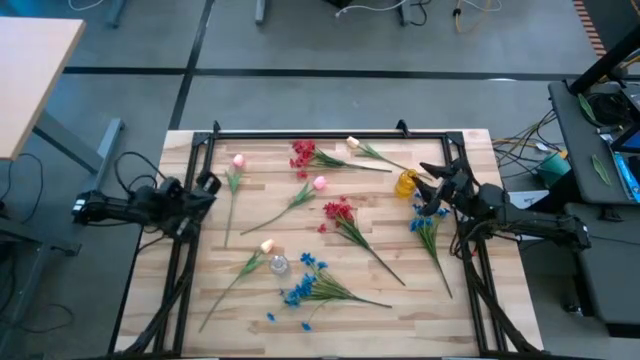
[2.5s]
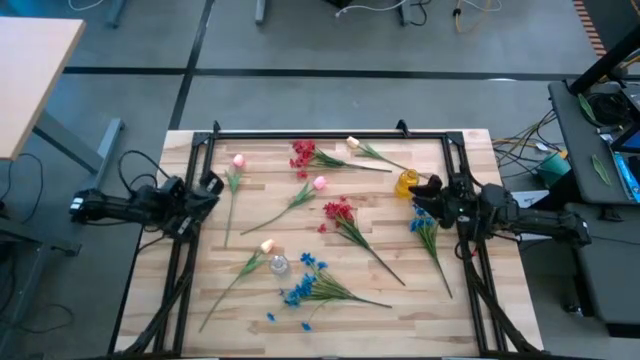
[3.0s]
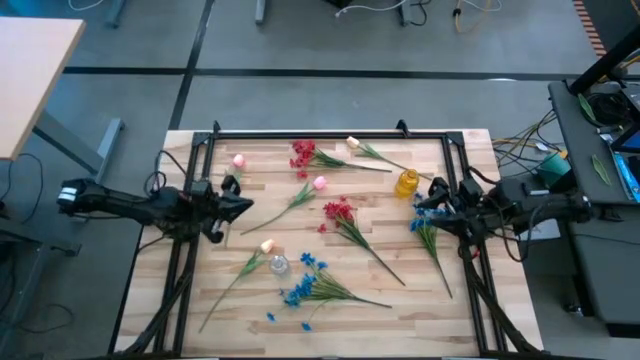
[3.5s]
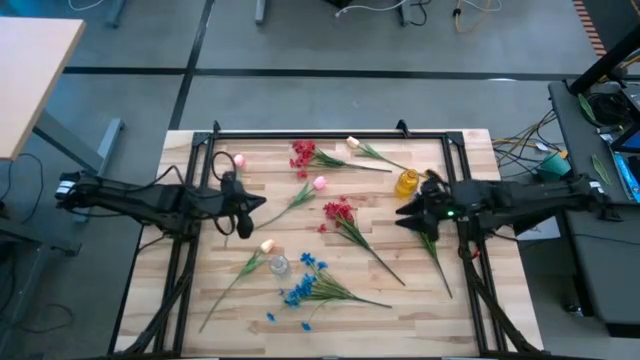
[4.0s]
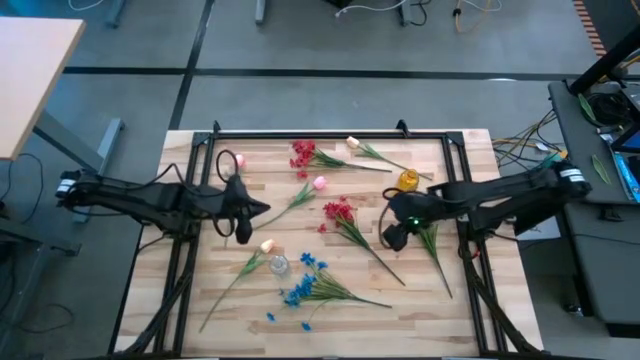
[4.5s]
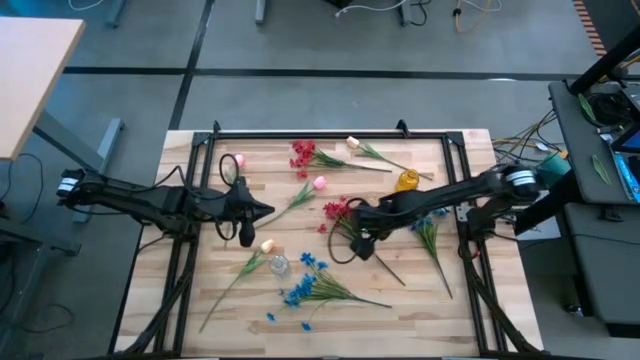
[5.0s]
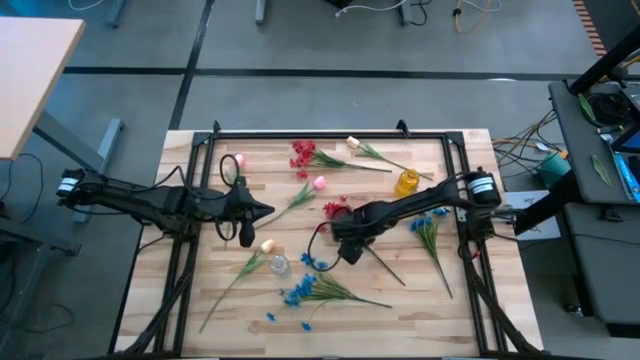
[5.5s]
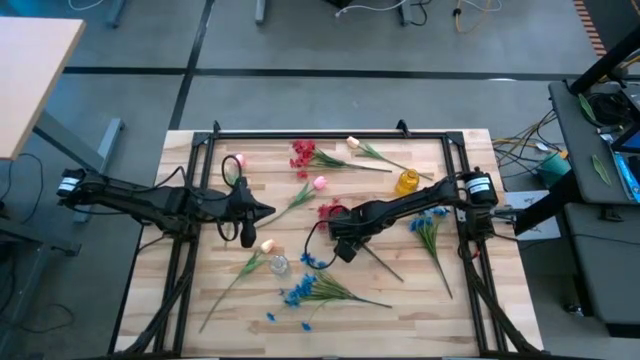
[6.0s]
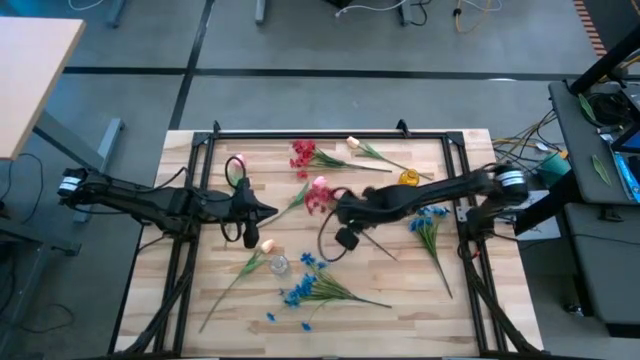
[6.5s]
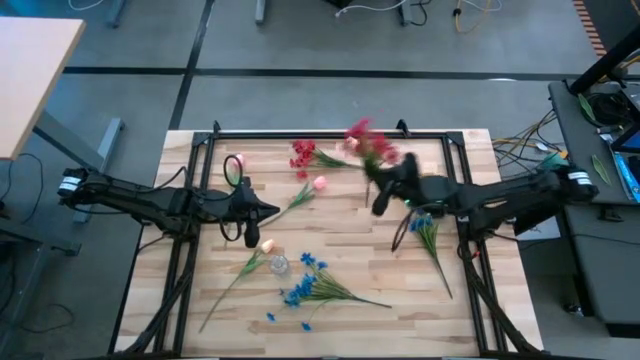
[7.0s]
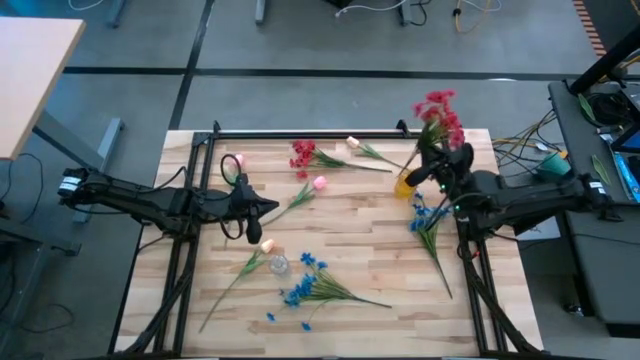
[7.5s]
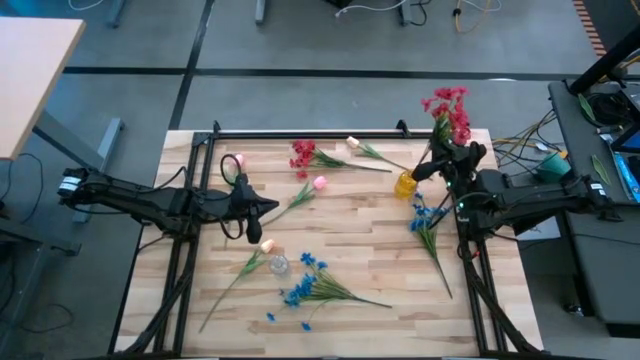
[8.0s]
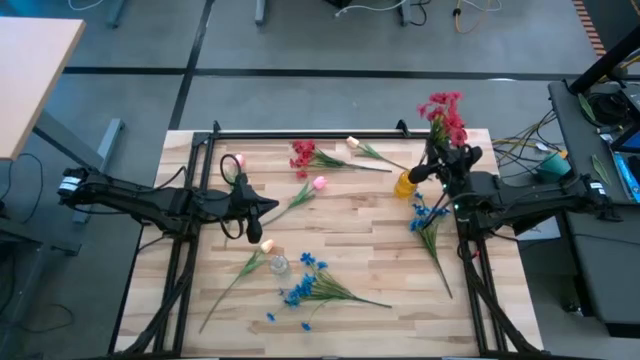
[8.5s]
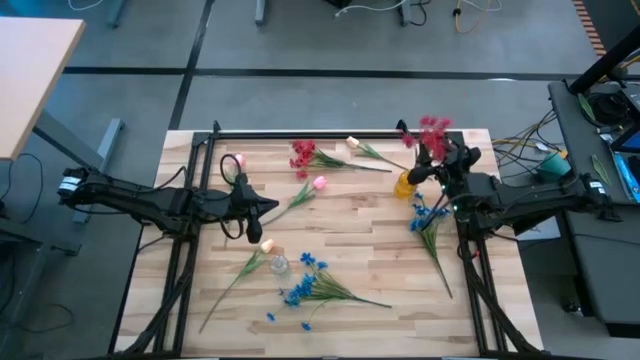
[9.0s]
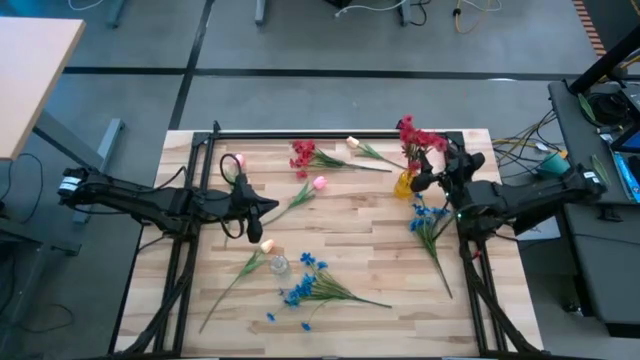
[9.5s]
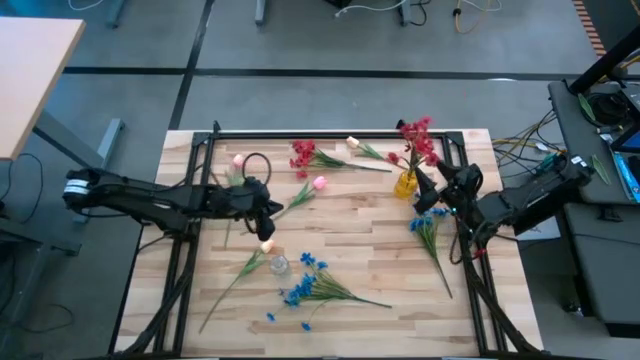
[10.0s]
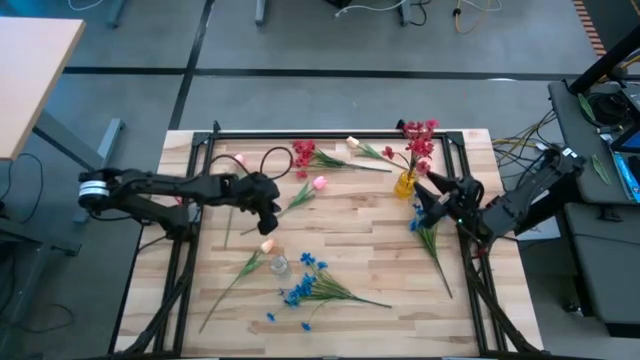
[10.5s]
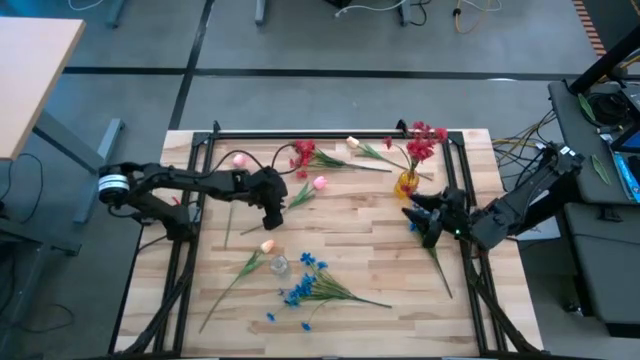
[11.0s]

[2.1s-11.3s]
Task: Sort flowers into vase by color
Put the bottom red flowers into the yellow vase

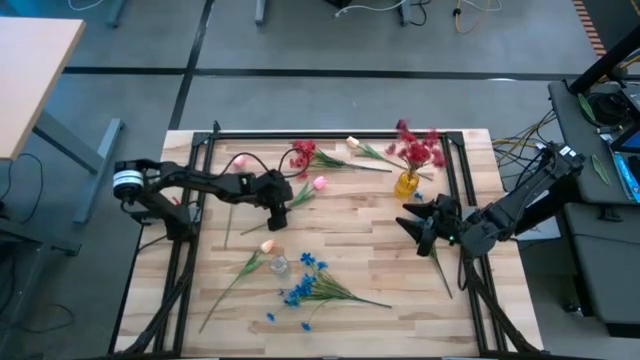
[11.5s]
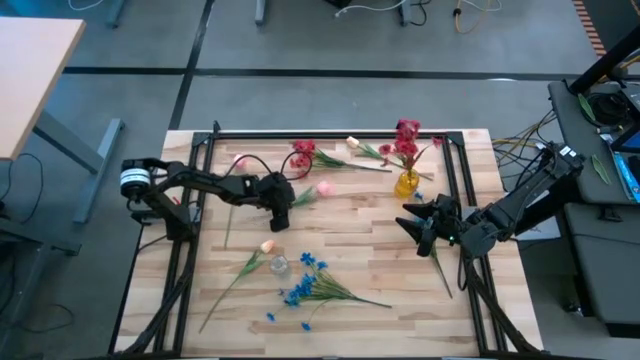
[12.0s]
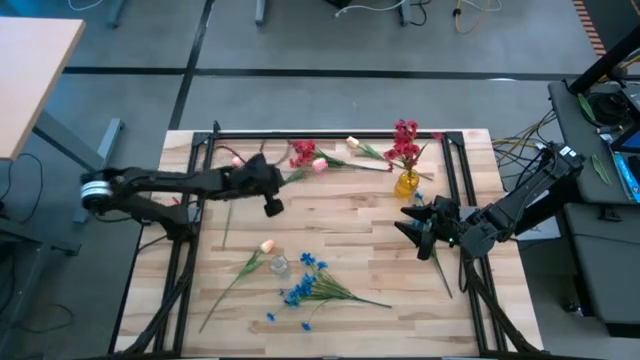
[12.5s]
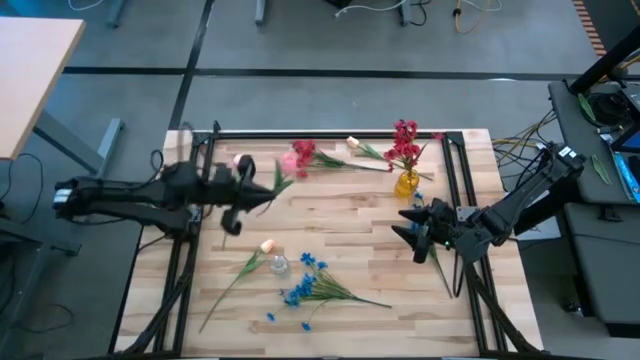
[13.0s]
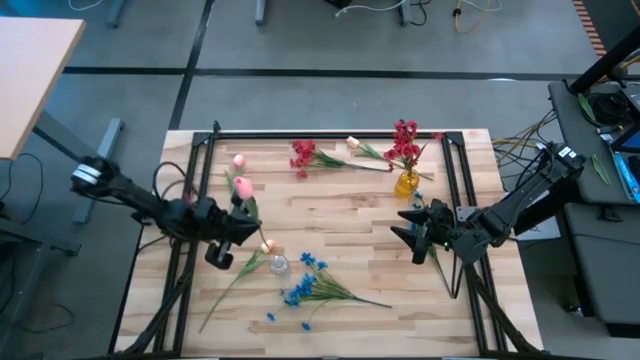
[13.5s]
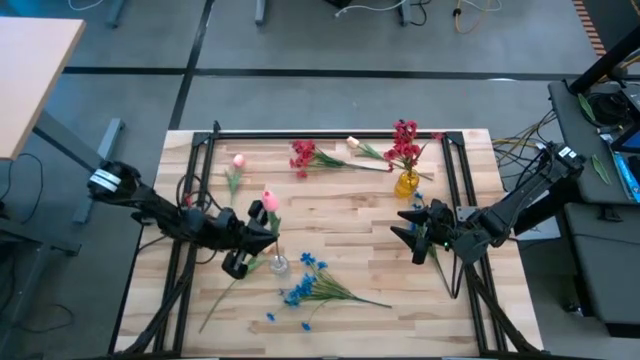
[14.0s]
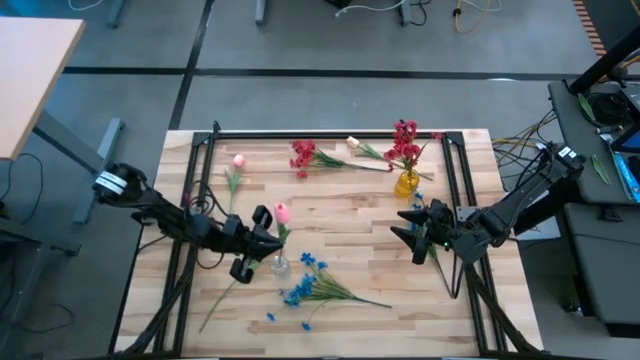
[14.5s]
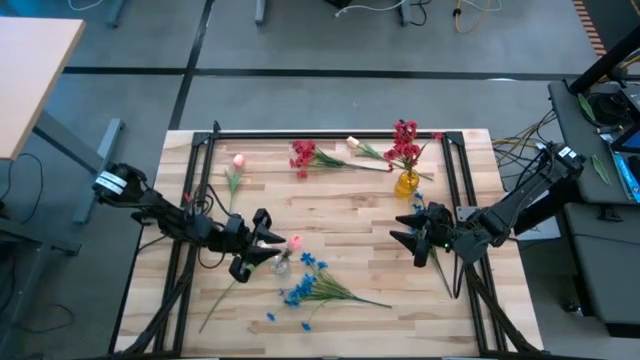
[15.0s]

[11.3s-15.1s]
Put the right pink tulip into the transparent vase

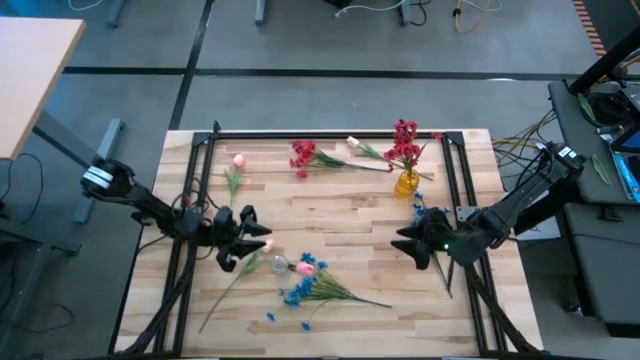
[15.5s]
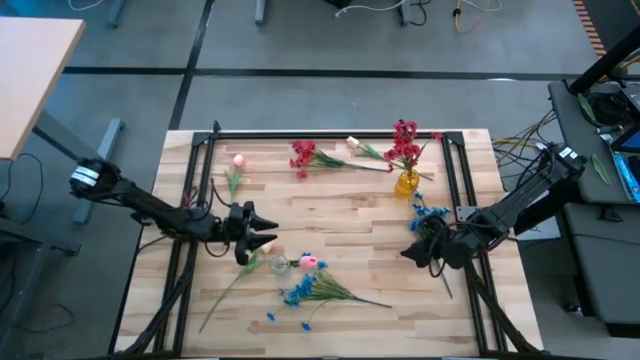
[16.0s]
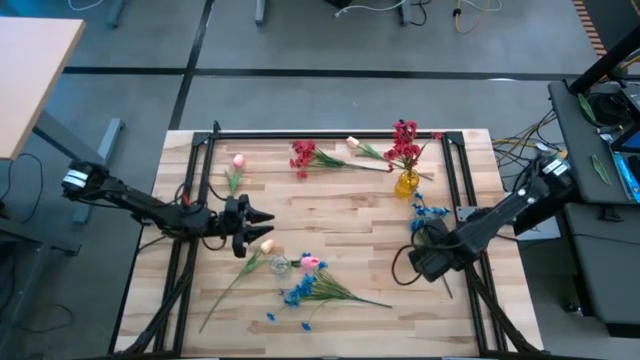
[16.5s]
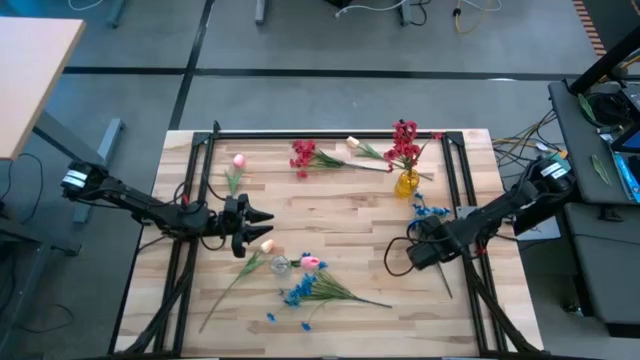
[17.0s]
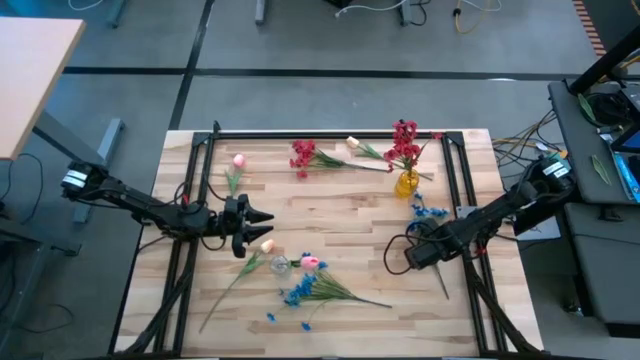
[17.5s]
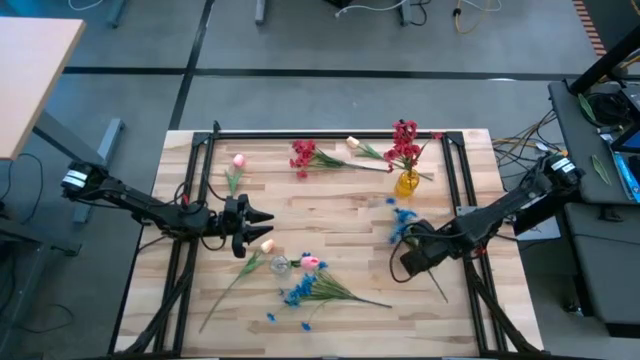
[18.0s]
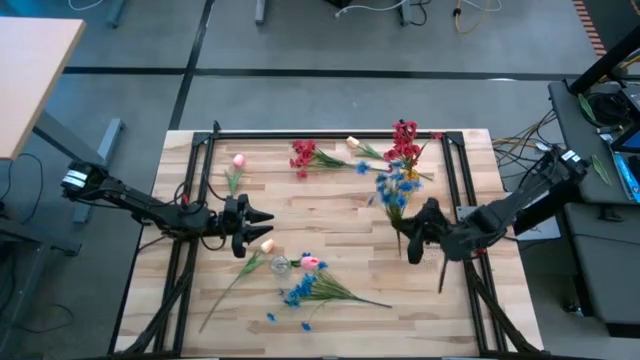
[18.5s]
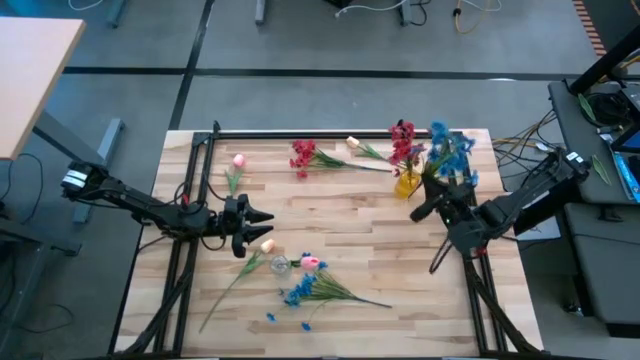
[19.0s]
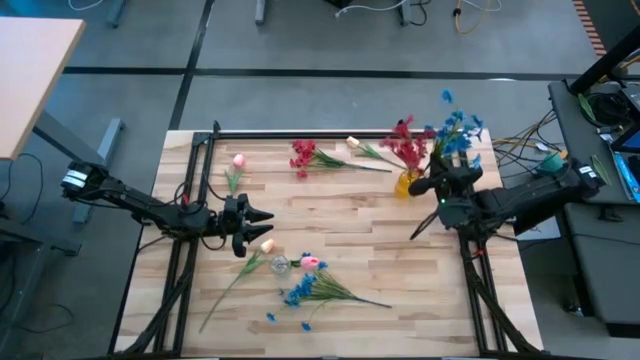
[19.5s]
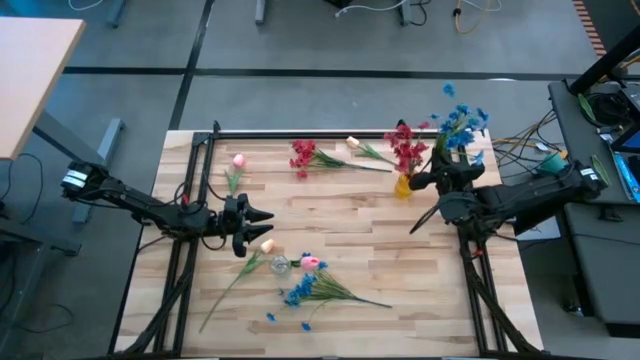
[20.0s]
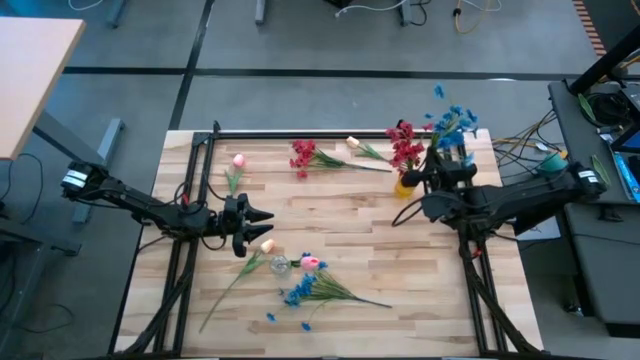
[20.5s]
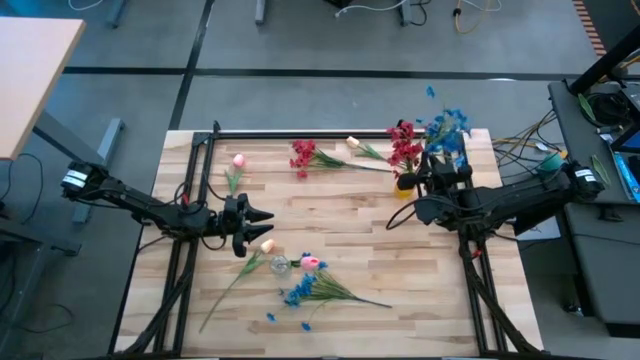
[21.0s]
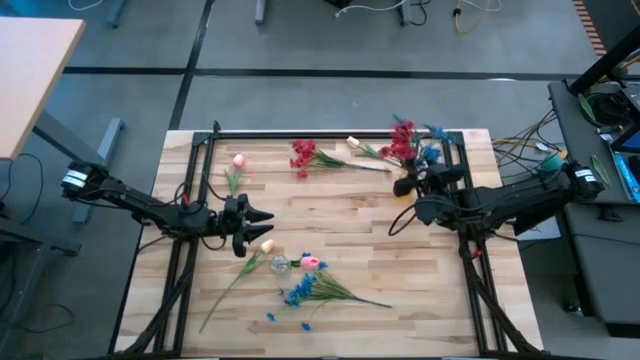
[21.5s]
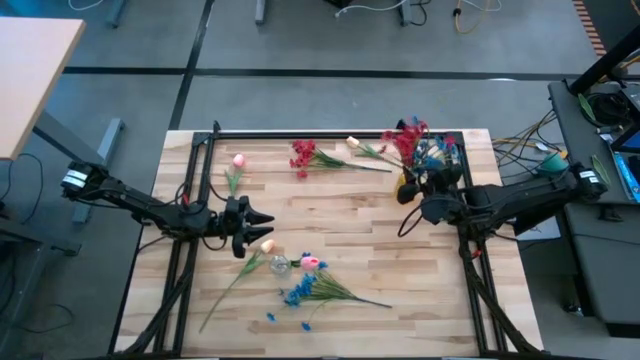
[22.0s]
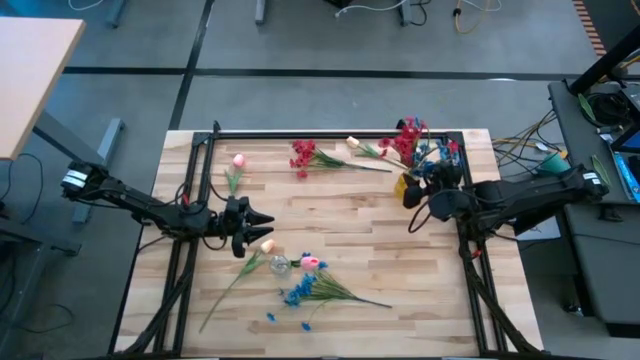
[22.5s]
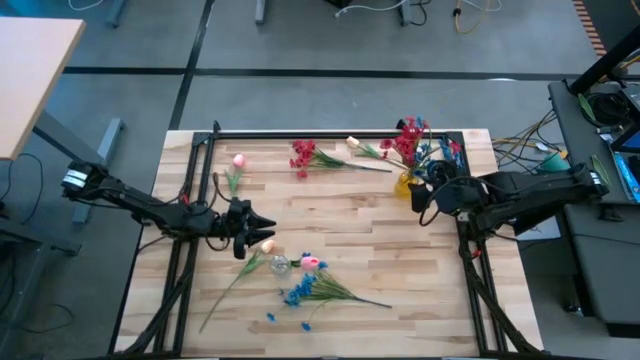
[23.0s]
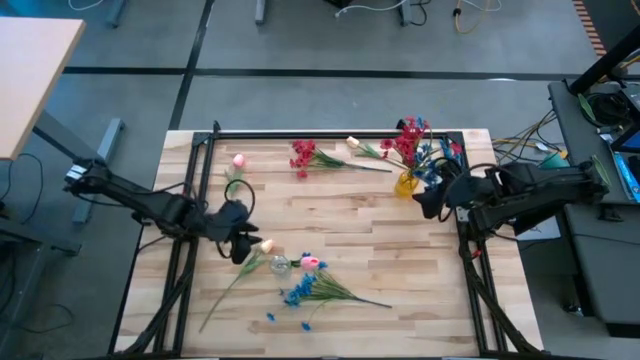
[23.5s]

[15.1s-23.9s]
Put the top blue flowers into the yellow vase
